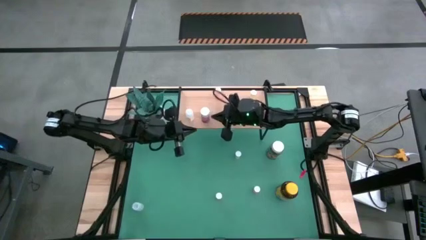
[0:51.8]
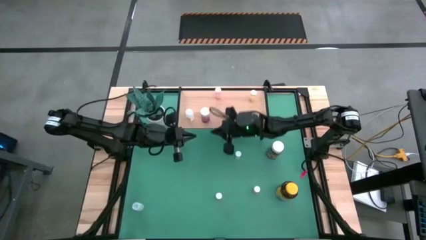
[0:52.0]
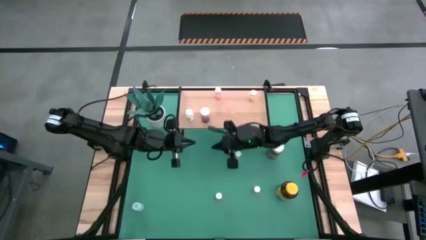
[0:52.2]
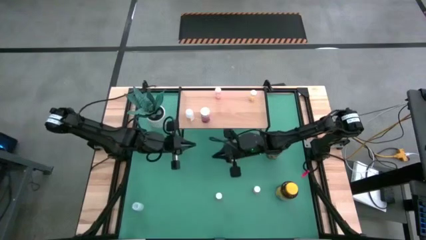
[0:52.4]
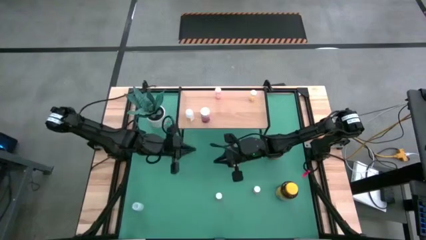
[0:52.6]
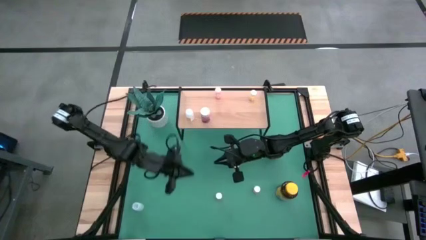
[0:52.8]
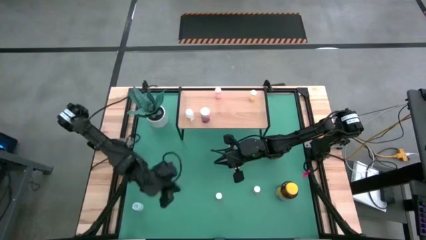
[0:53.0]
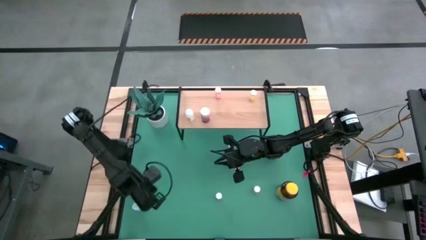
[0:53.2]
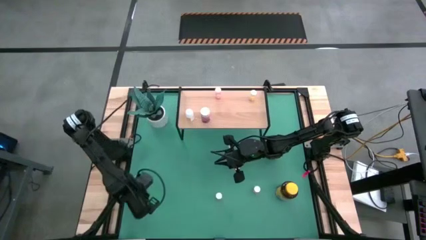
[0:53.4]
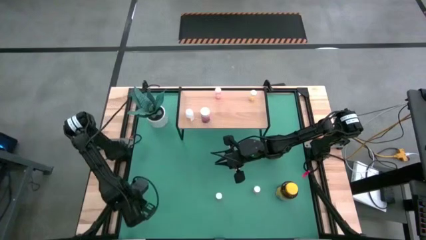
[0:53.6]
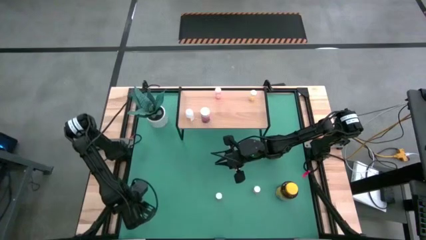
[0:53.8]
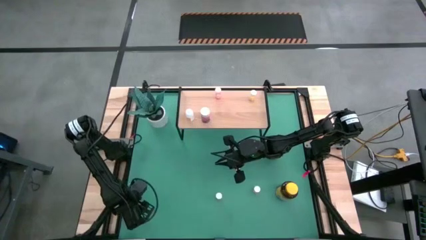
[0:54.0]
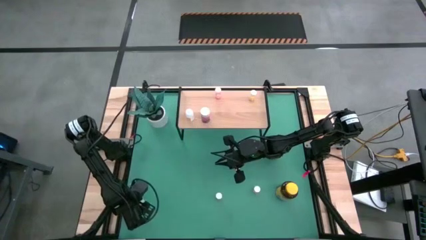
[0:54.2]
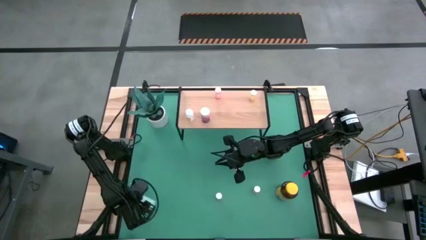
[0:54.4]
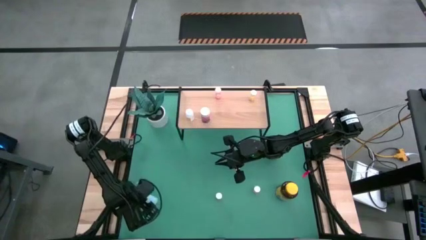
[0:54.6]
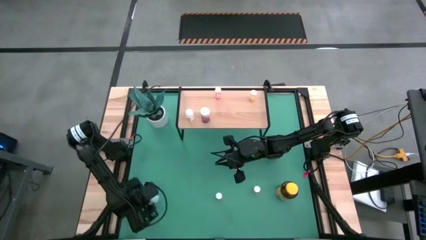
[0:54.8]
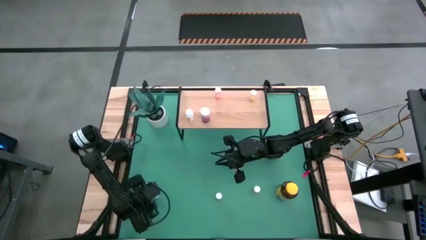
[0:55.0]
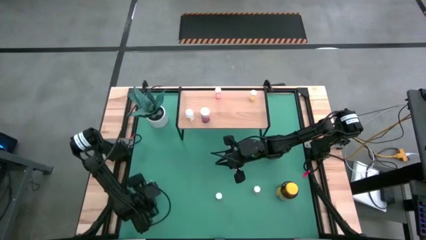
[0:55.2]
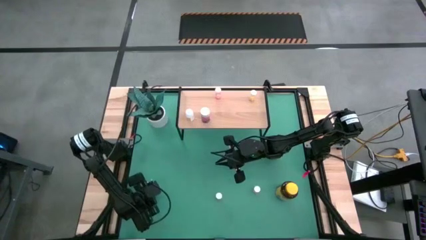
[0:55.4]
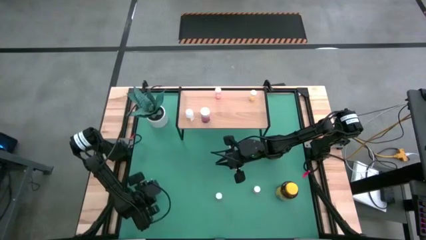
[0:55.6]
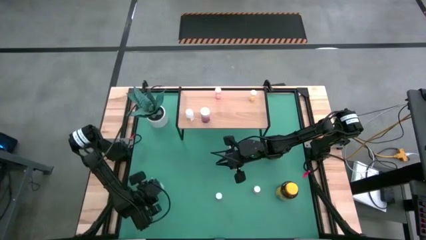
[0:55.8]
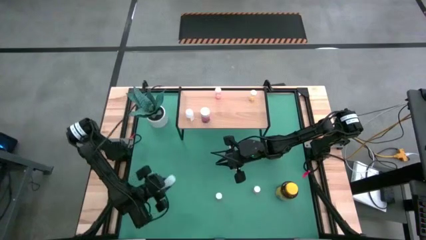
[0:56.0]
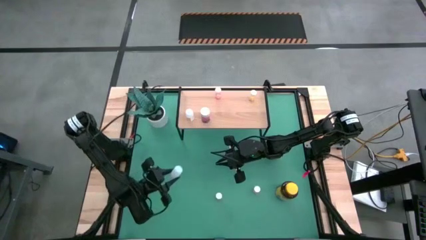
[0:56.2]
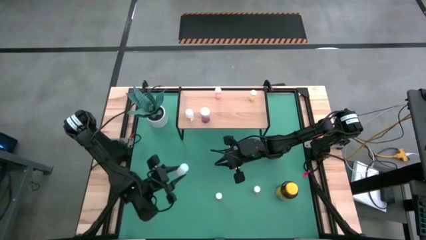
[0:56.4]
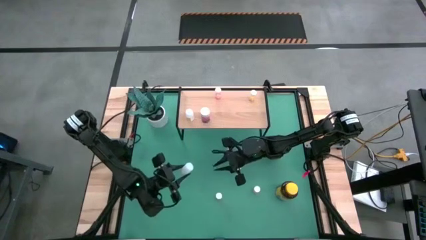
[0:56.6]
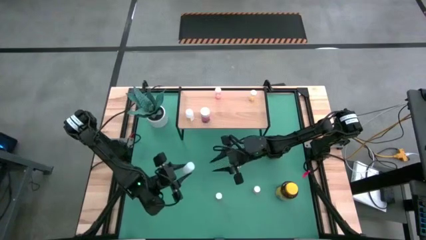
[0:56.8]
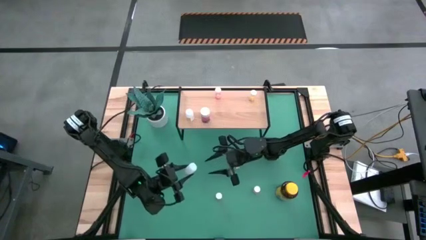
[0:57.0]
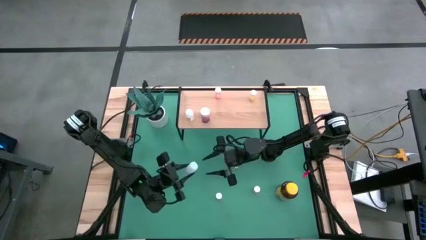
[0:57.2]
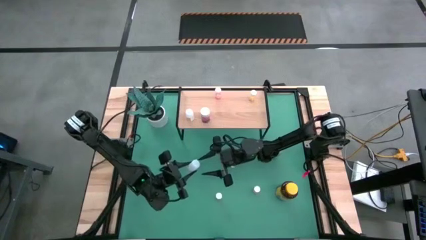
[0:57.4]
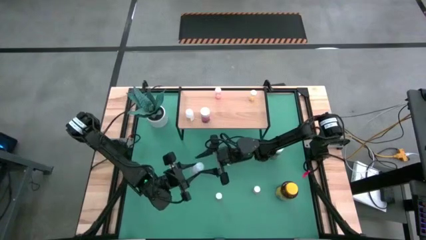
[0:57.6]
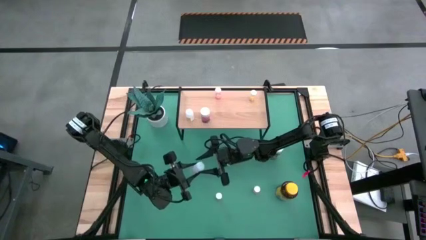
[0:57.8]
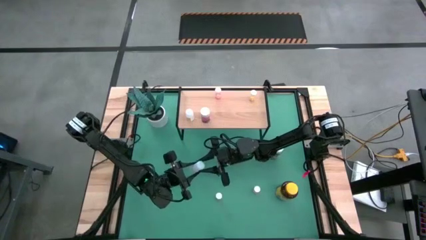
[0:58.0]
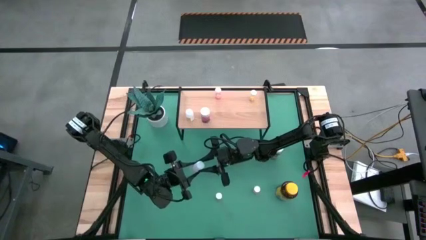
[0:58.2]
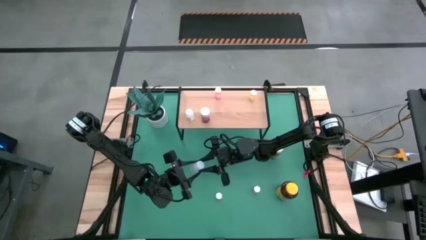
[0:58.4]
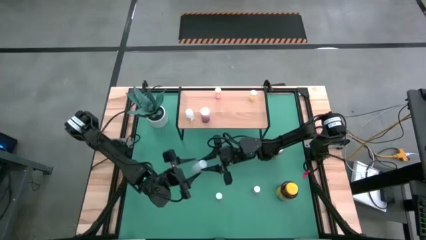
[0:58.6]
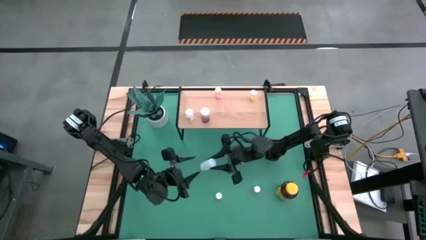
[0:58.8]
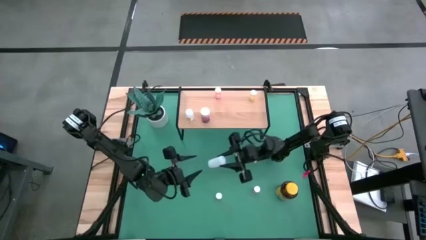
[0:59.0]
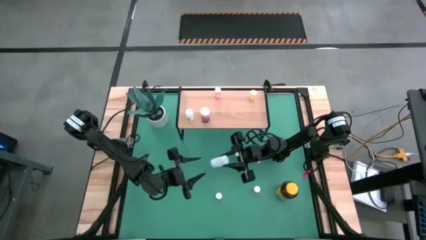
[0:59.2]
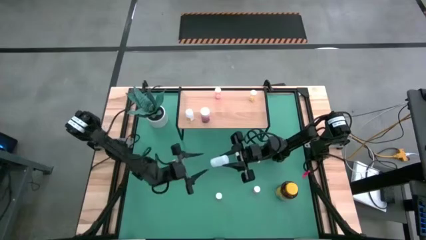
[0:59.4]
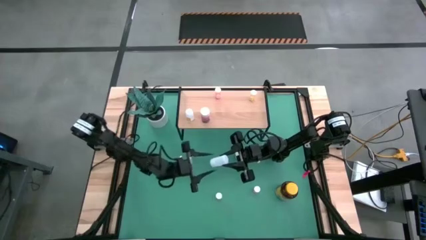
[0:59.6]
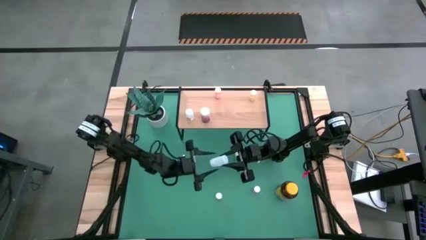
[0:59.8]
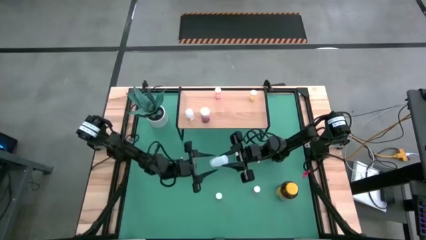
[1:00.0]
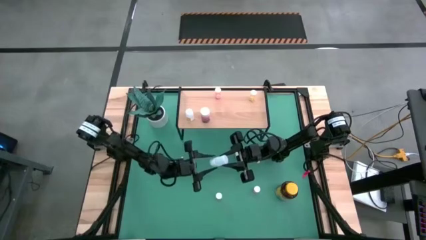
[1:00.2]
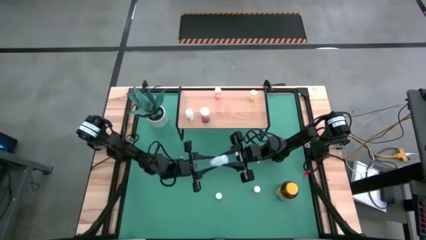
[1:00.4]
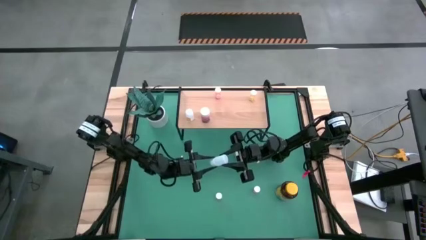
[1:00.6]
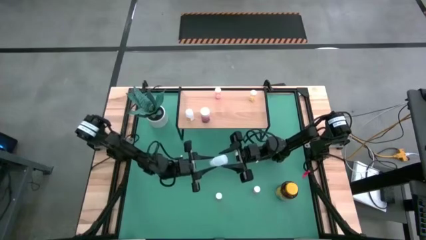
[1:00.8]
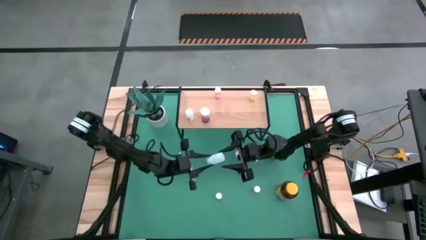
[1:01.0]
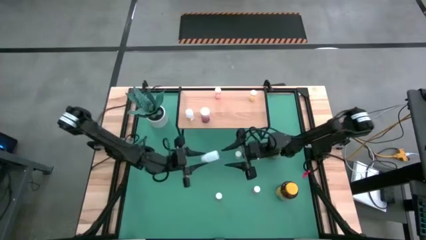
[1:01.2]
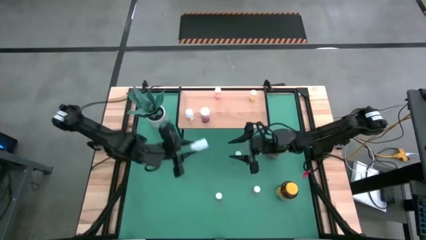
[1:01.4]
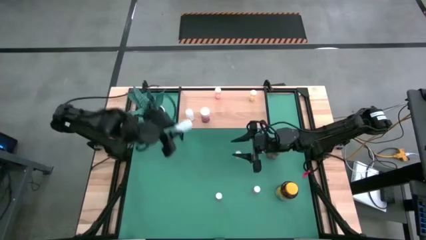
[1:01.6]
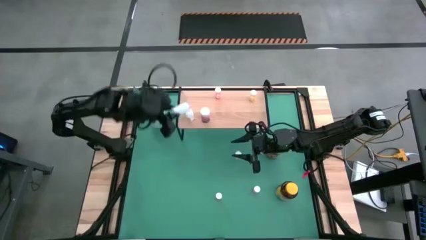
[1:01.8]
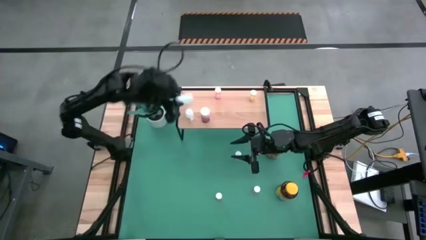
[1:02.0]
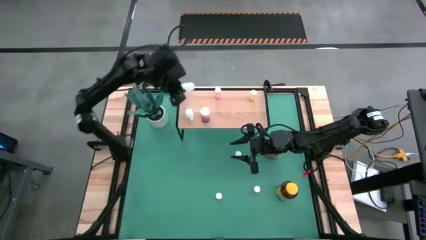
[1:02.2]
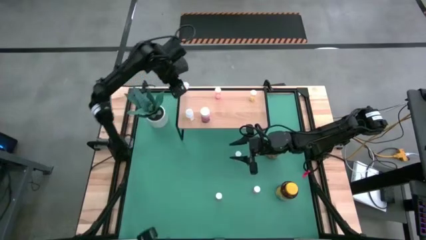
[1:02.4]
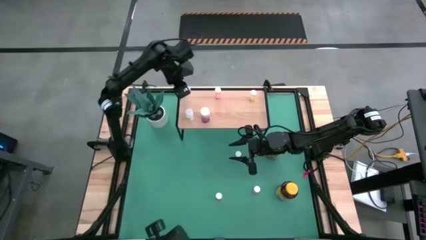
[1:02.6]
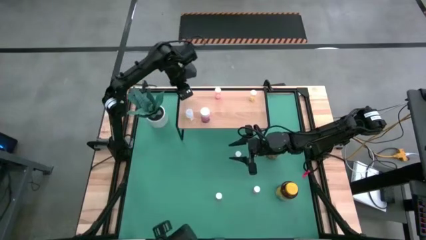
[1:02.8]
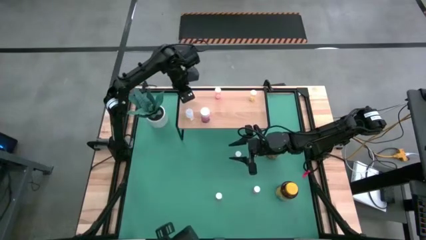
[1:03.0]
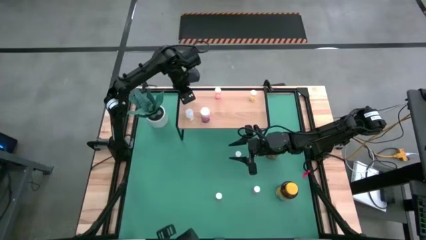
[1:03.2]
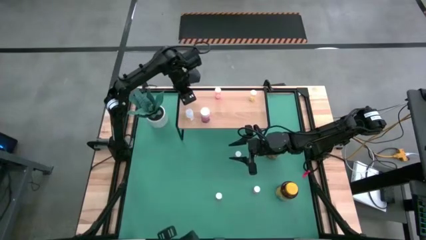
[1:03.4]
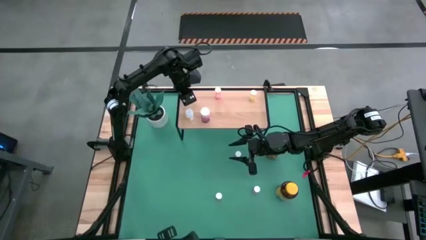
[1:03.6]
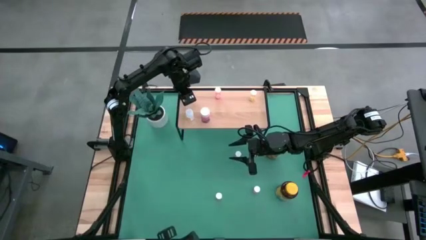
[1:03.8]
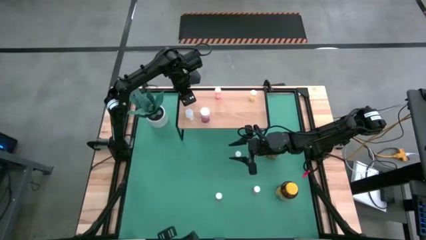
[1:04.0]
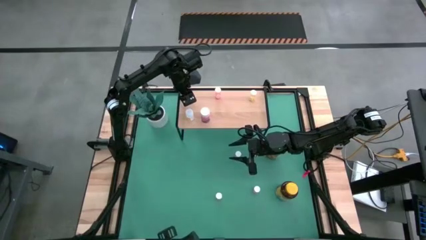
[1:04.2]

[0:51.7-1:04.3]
Task: Pick and place medicine bottles onto shelf by color
Put the white pill bottle on the shelf
